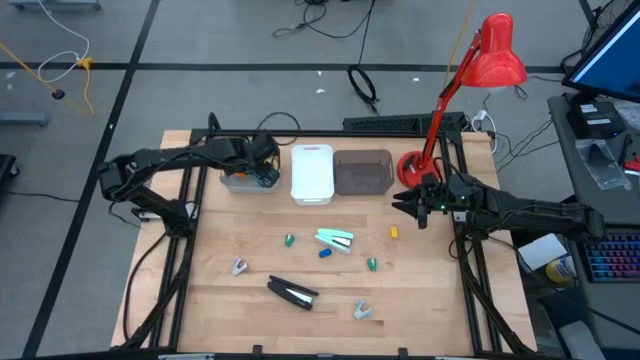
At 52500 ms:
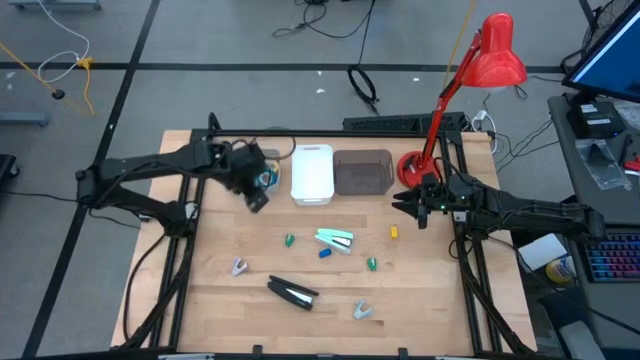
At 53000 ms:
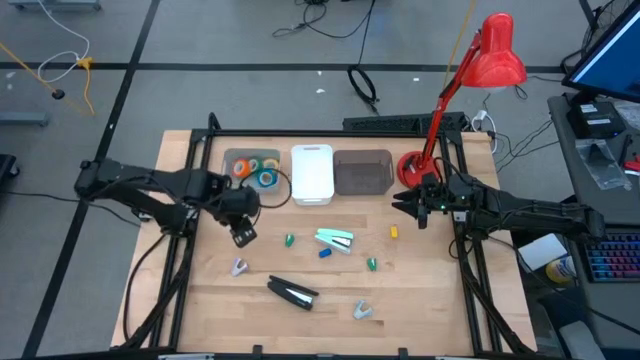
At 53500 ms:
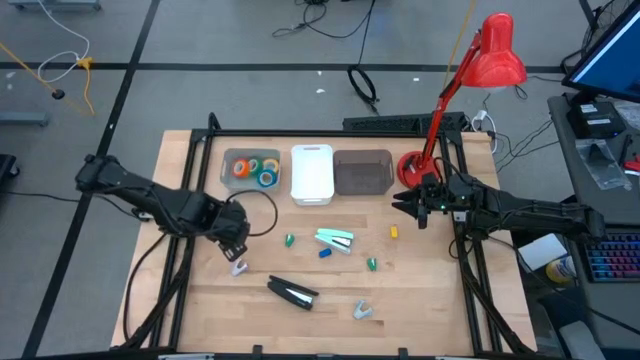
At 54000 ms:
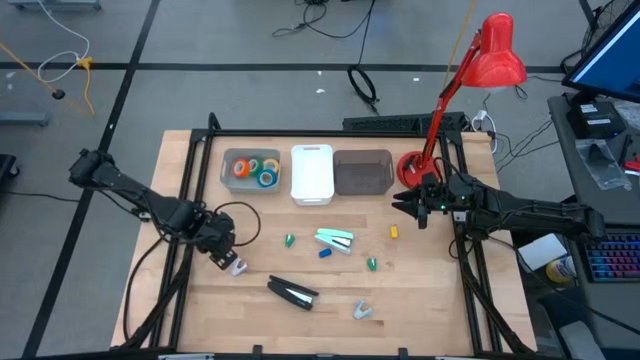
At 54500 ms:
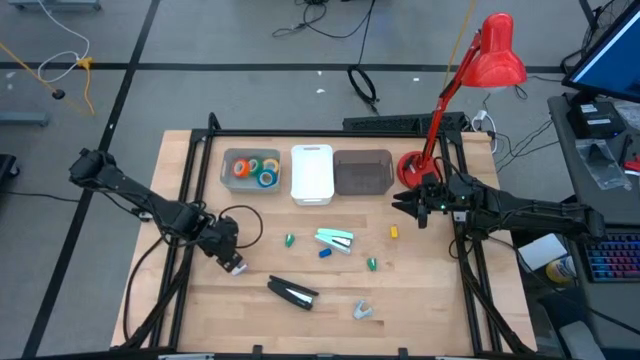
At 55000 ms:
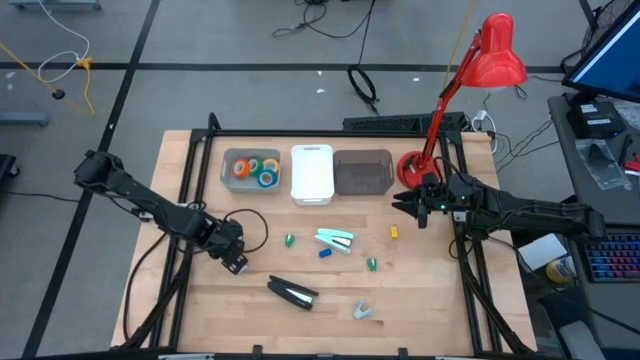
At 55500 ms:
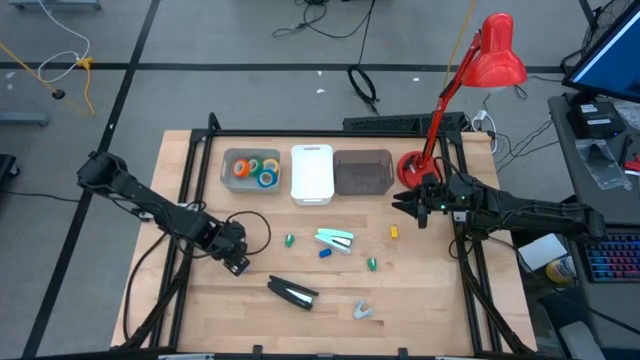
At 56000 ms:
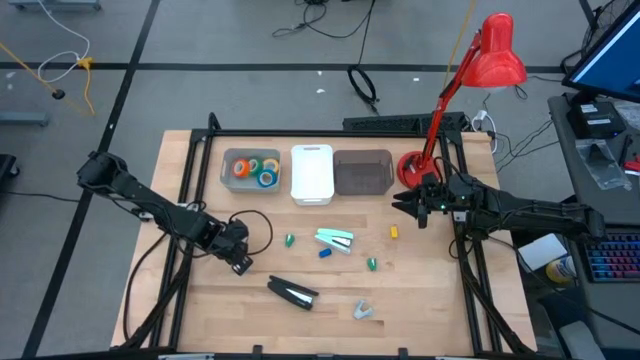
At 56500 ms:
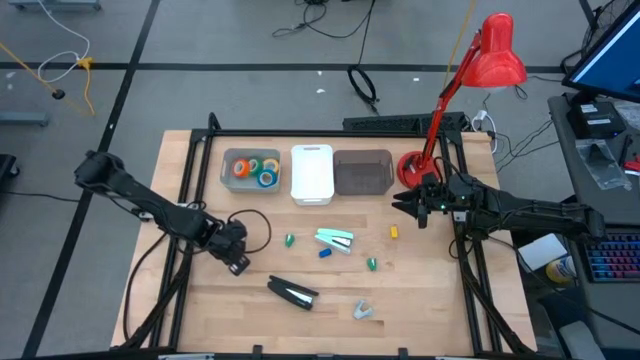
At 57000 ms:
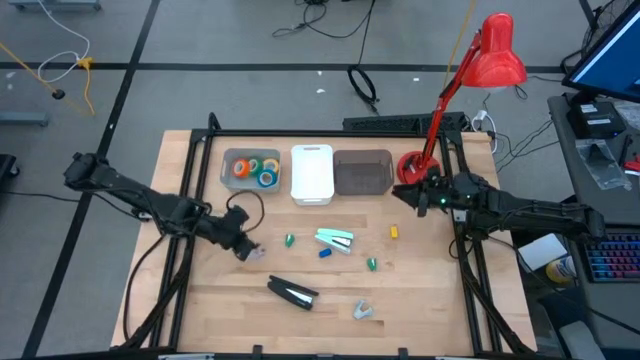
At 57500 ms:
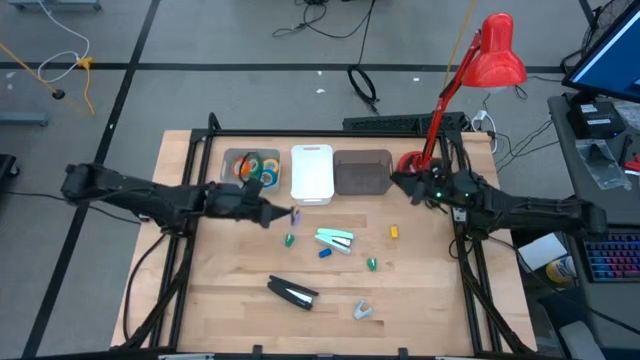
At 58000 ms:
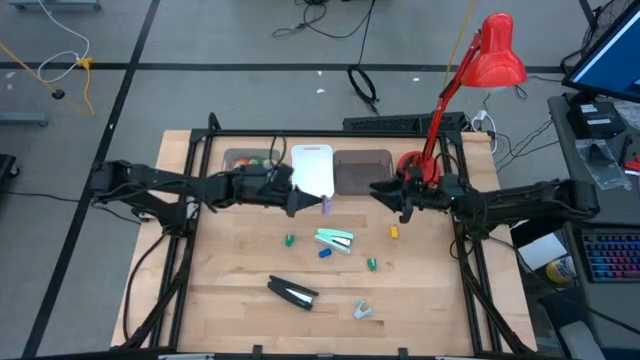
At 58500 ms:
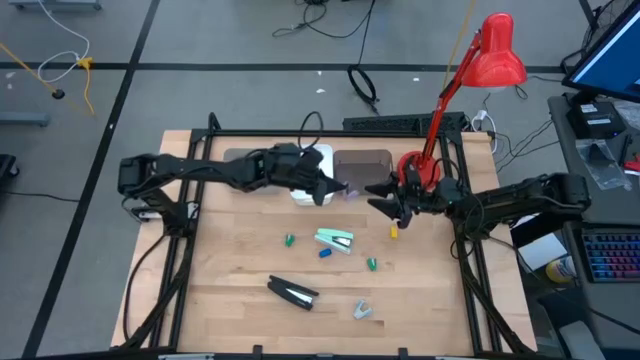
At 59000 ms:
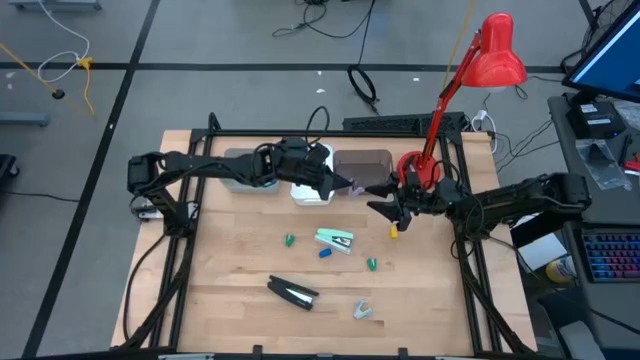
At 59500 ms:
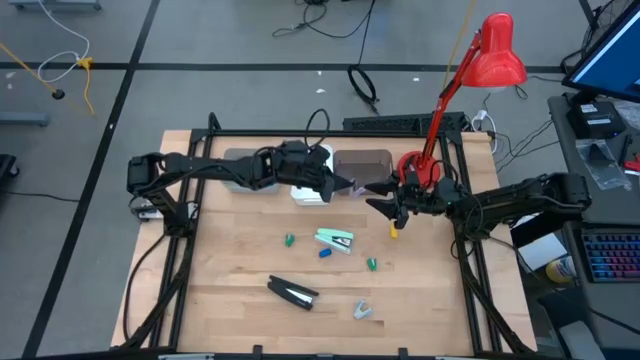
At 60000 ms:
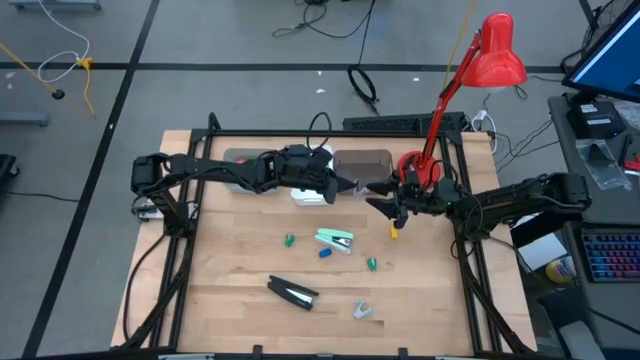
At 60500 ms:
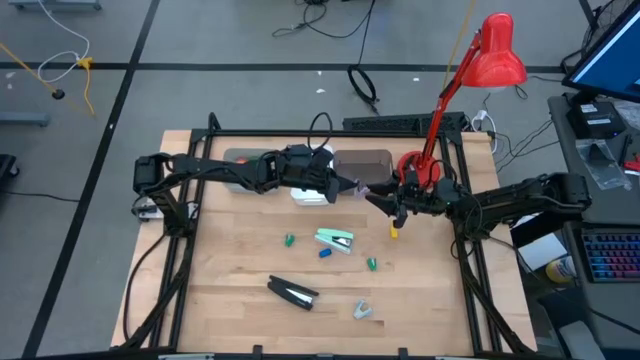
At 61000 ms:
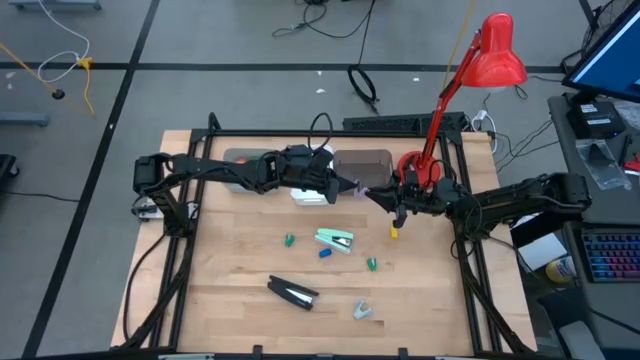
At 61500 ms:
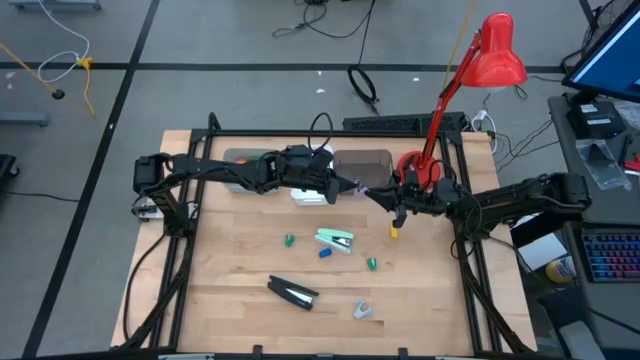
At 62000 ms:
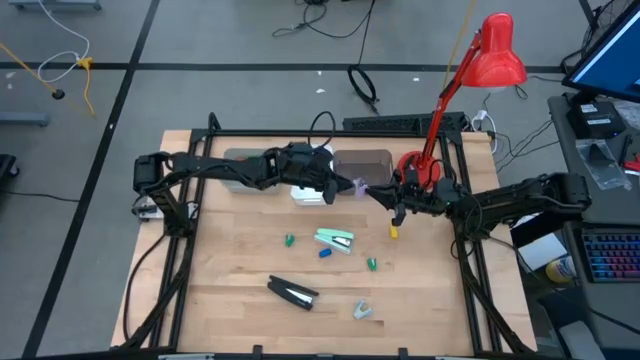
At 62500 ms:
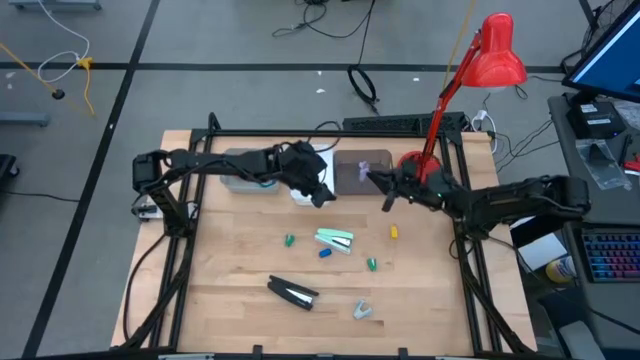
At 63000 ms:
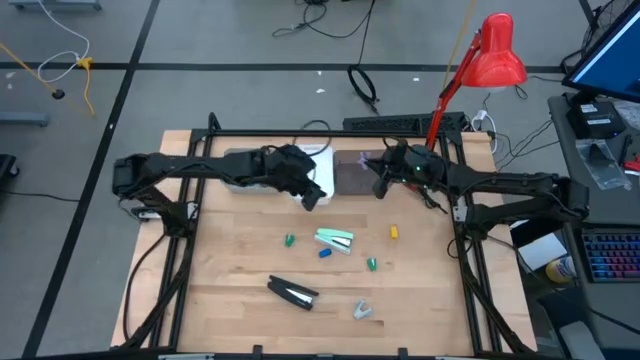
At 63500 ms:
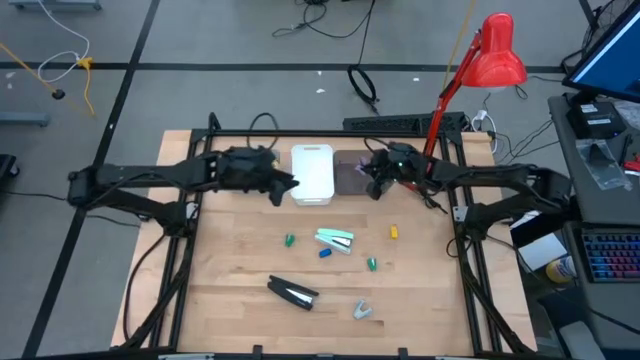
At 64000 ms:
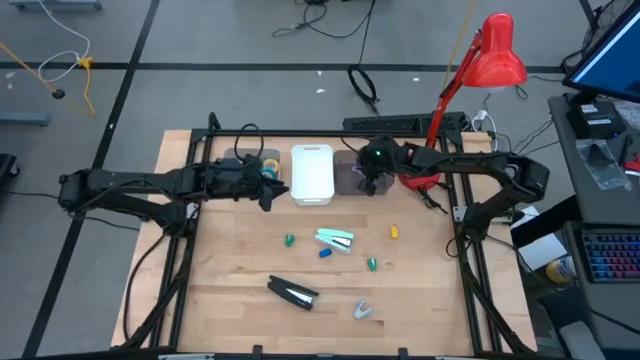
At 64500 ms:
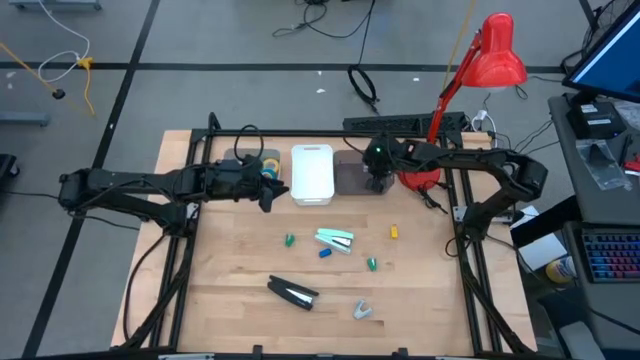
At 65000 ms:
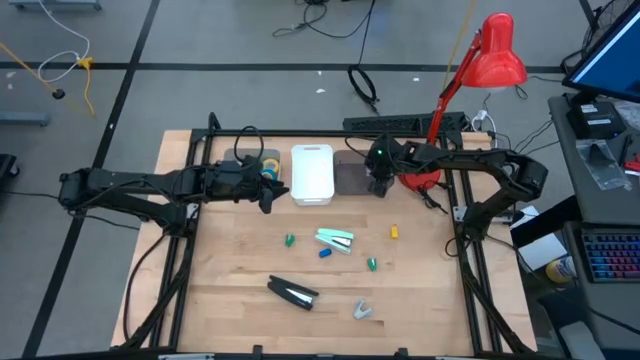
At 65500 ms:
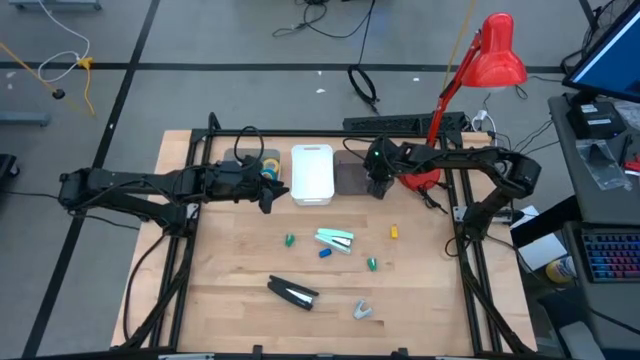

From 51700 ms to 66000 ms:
Task: Pick and place Stapler, Stapler remover, tape
Put the purple staple remover into the black bin

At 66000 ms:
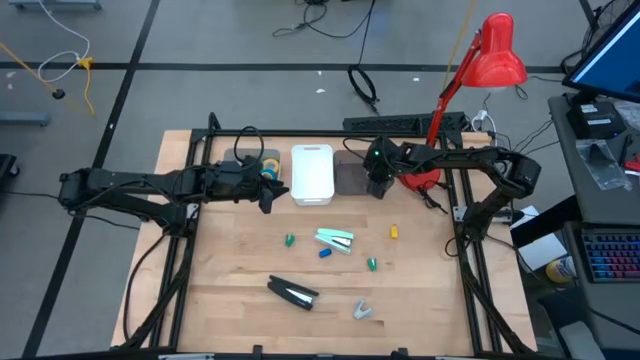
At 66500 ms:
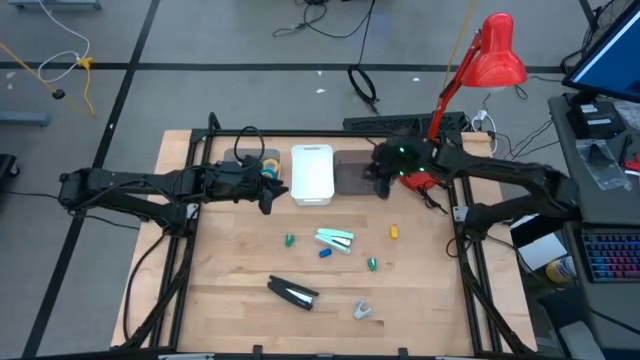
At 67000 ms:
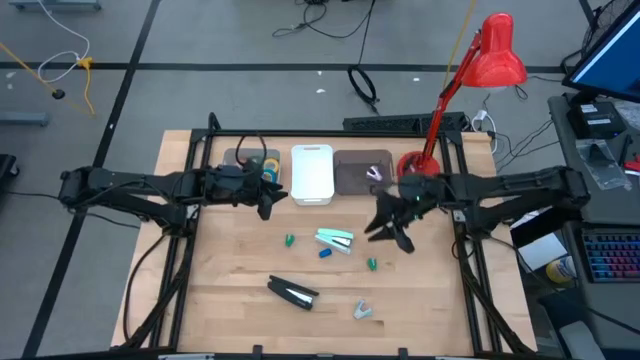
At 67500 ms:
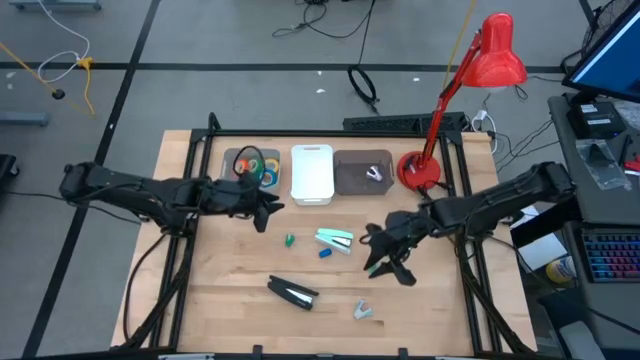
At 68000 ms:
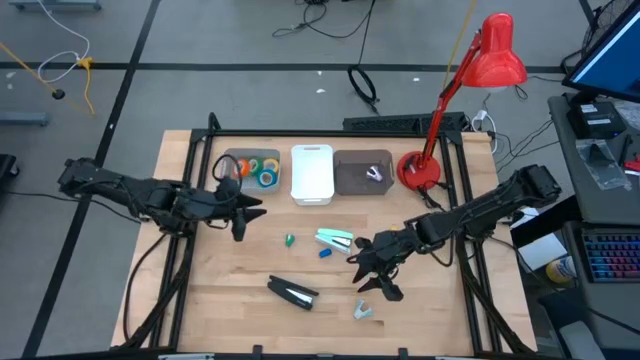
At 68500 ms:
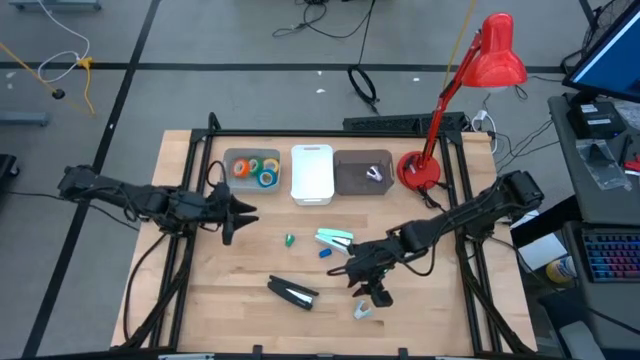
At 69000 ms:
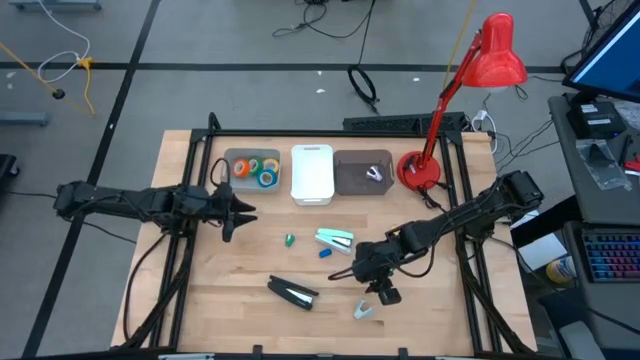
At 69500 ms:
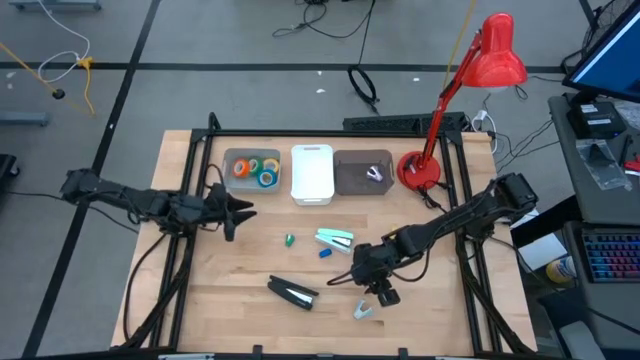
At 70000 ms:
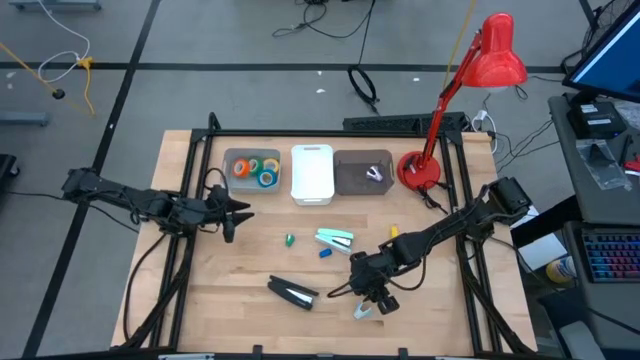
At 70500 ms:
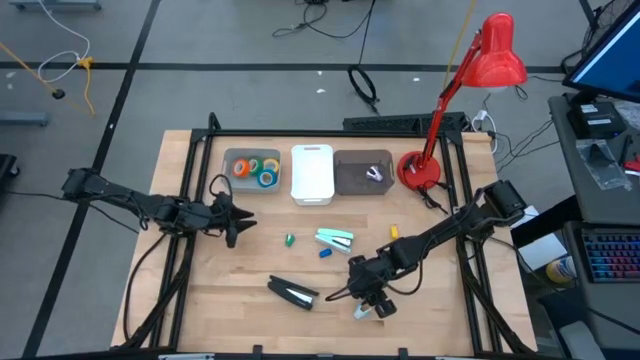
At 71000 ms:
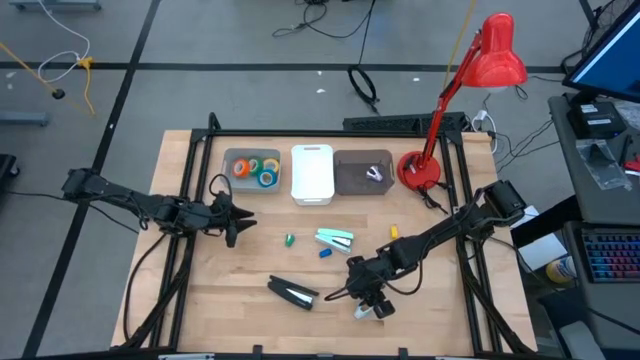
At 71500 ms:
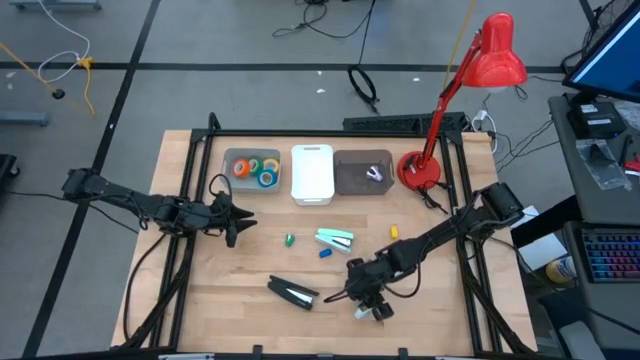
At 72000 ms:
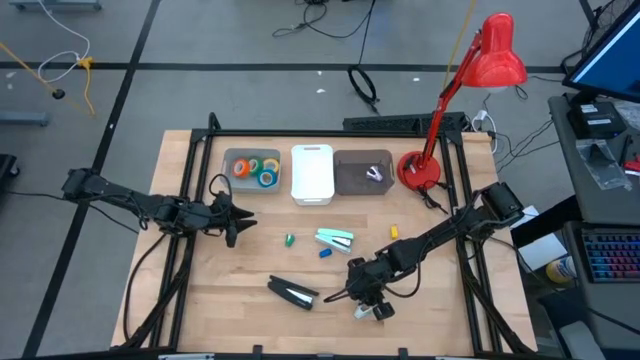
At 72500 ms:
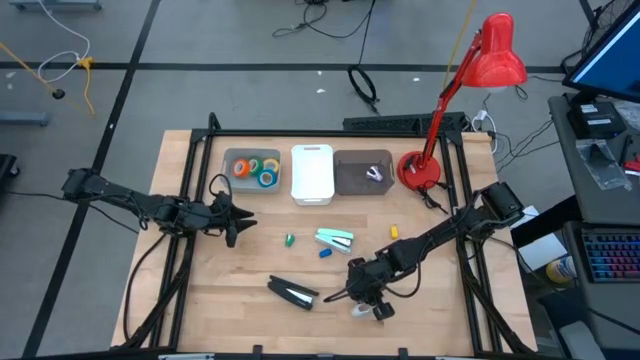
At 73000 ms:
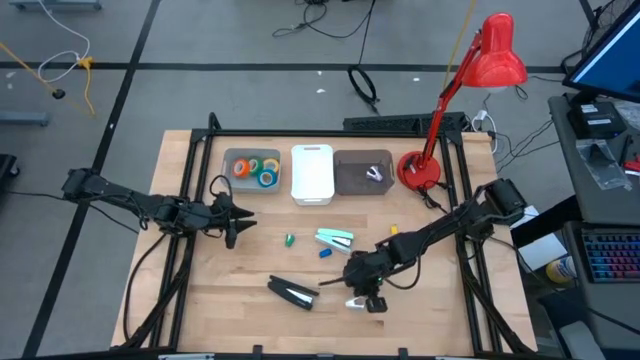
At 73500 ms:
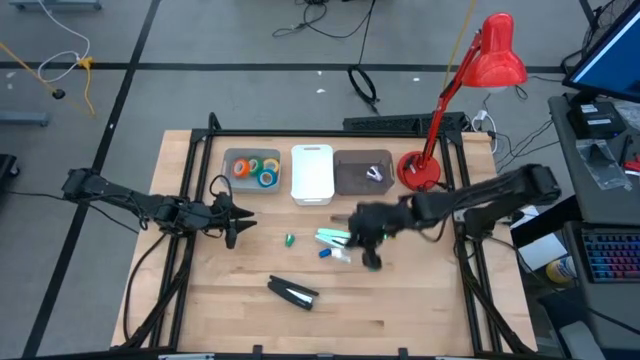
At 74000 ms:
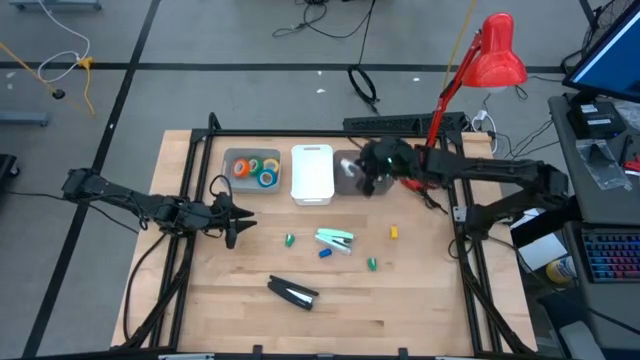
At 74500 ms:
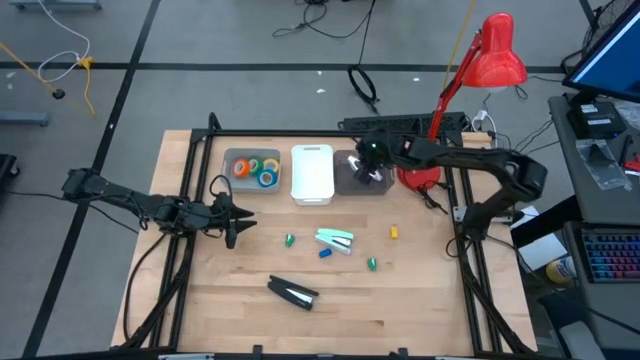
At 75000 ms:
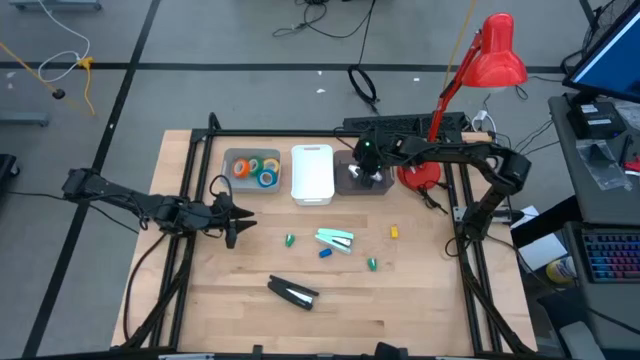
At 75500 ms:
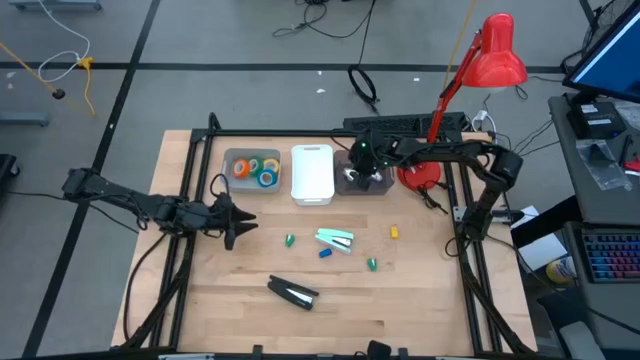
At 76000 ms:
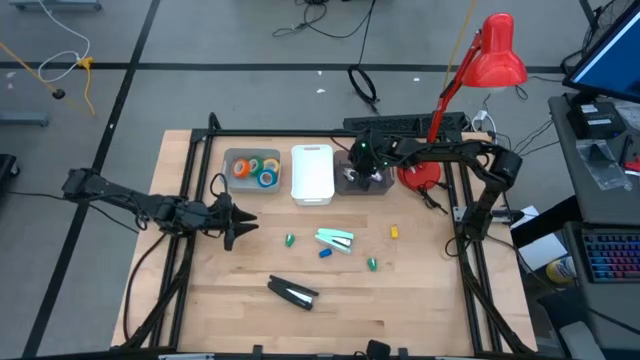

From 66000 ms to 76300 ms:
Put the blue staple remover into the black bin
